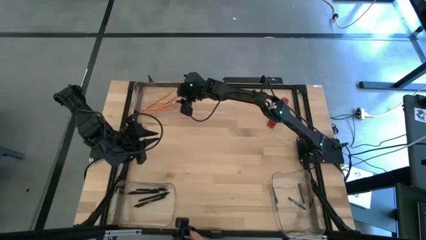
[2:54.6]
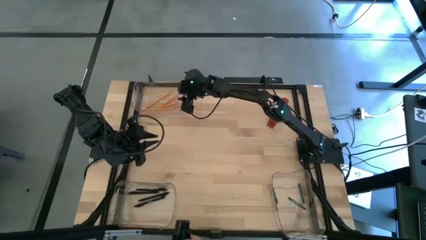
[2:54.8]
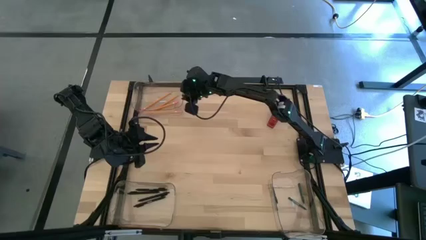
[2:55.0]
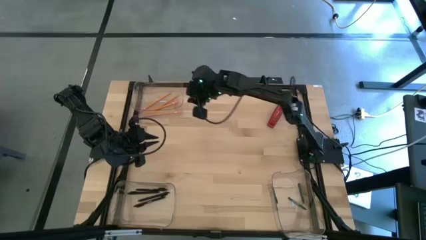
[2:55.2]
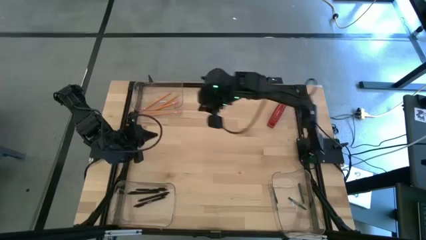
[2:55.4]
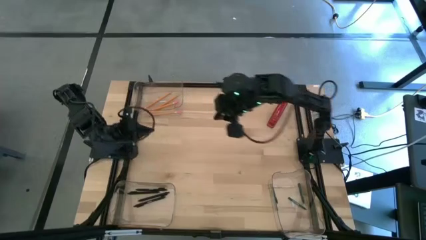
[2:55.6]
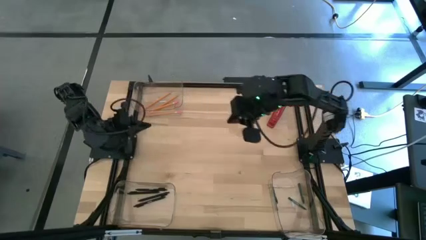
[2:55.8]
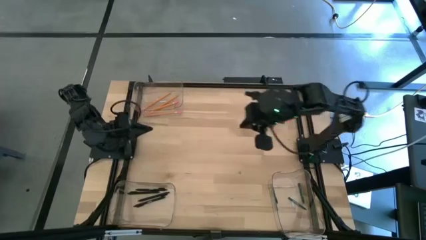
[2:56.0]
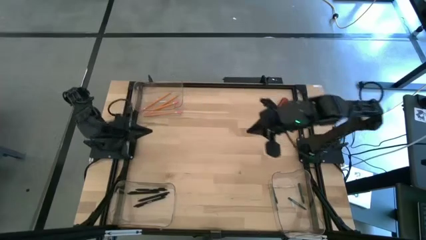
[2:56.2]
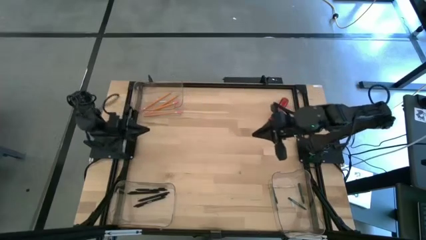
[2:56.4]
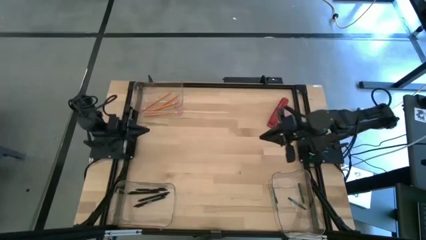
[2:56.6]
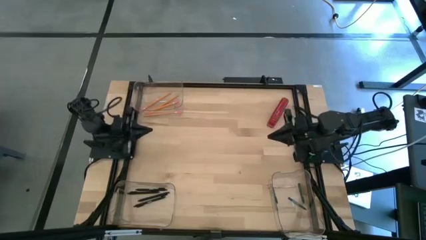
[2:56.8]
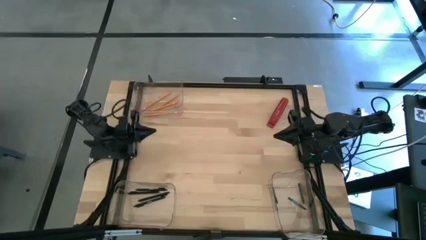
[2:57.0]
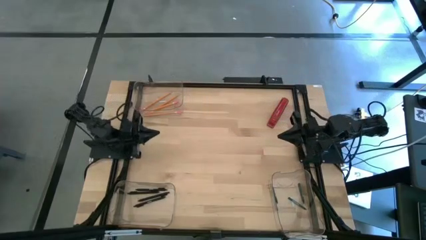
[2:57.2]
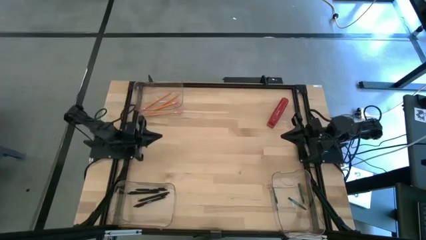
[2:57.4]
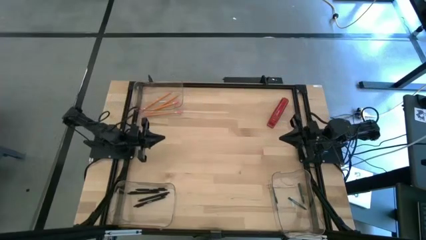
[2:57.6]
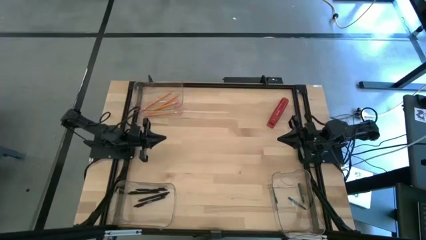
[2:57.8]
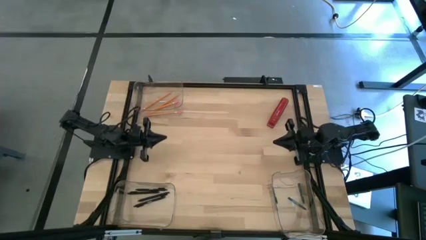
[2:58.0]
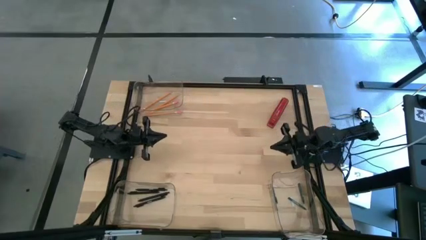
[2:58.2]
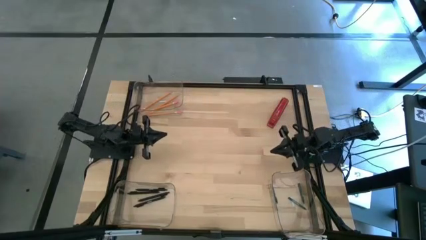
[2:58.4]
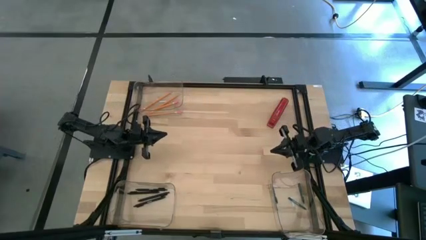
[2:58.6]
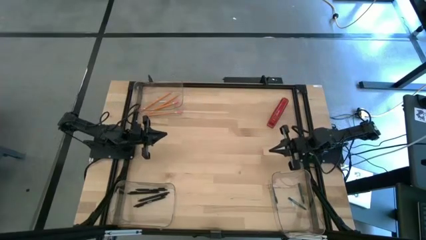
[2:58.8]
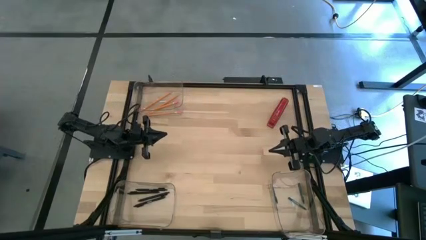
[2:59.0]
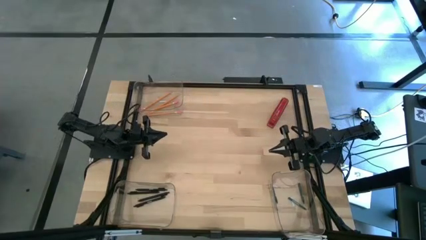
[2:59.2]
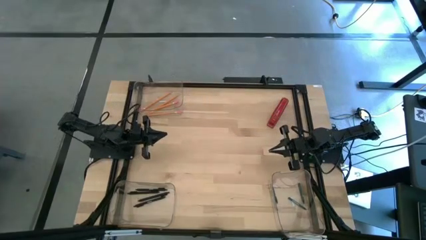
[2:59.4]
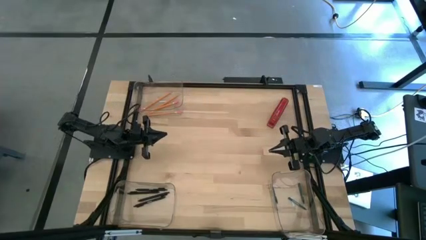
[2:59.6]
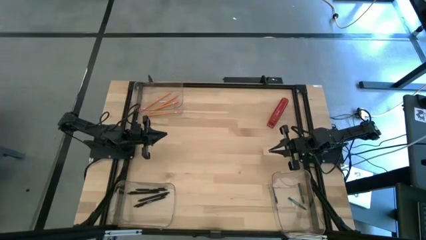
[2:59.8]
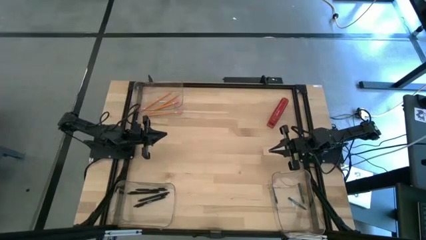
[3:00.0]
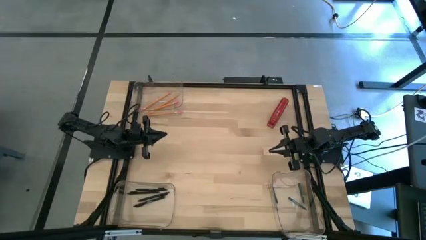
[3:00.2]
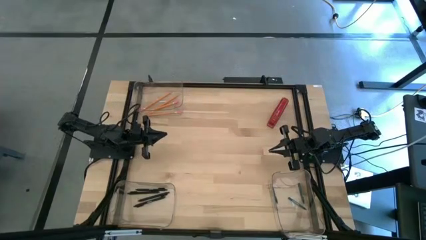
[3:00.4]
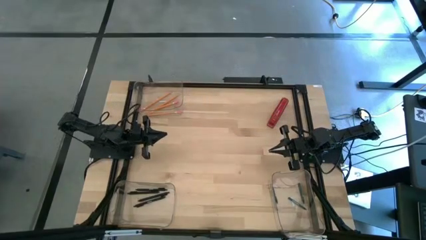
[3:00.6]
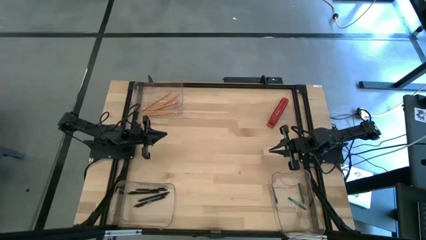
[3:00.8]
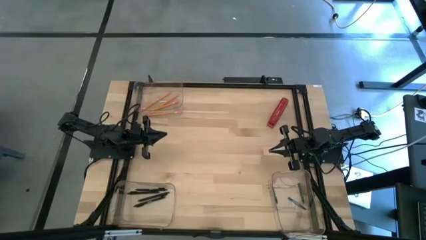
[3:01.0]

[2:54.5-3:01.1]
Task: Sort crayons/erasers/pens/pencils in bins
Return to Home Position

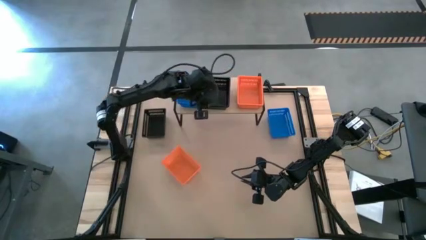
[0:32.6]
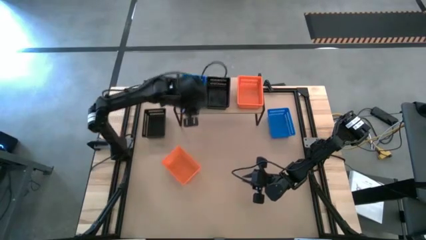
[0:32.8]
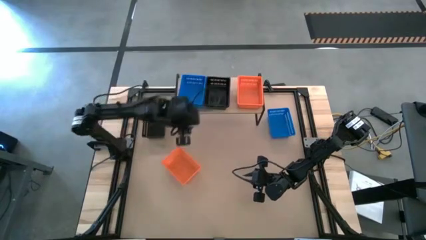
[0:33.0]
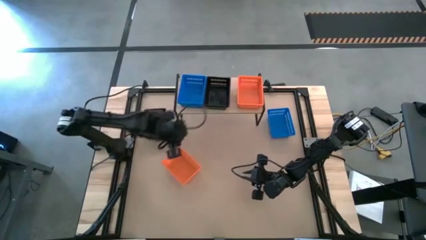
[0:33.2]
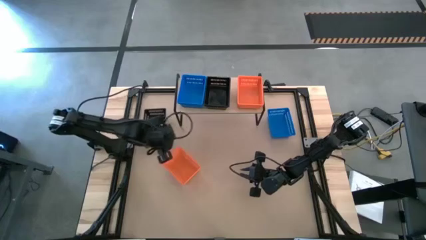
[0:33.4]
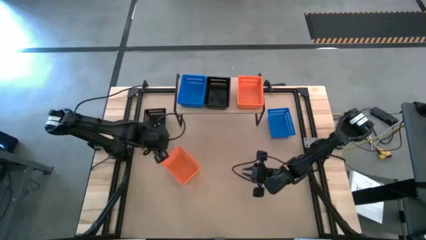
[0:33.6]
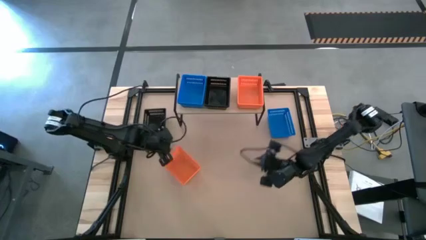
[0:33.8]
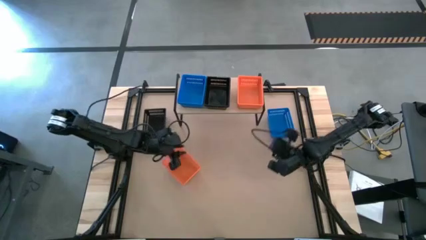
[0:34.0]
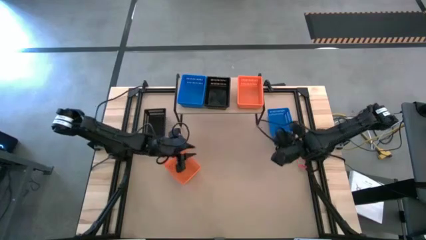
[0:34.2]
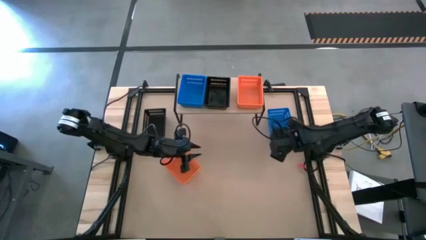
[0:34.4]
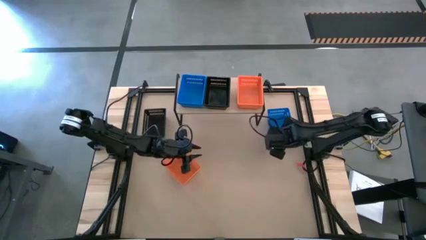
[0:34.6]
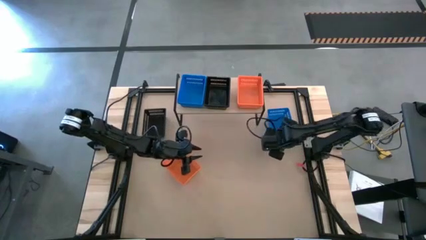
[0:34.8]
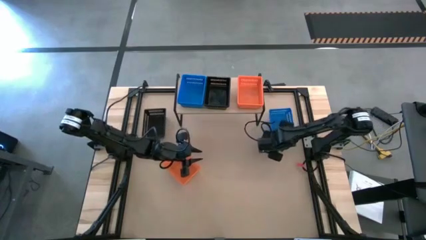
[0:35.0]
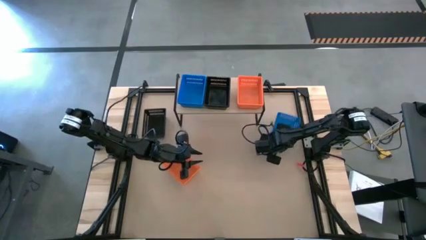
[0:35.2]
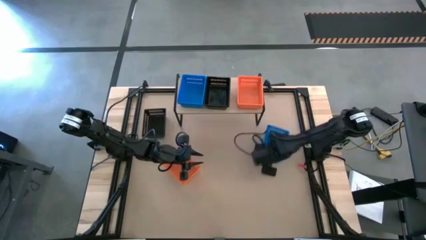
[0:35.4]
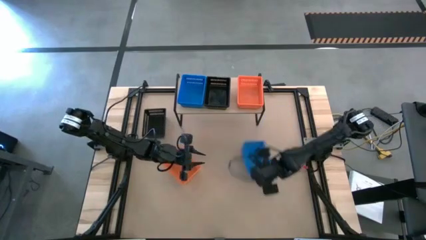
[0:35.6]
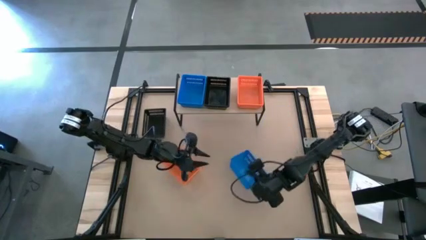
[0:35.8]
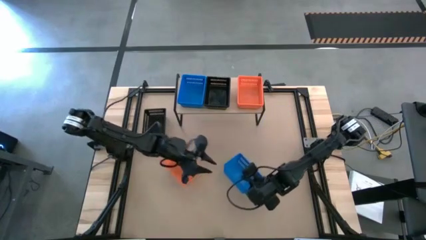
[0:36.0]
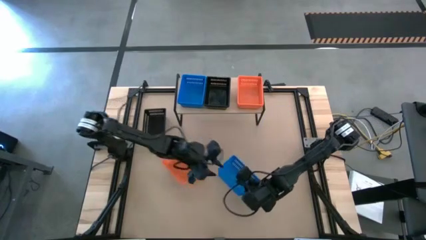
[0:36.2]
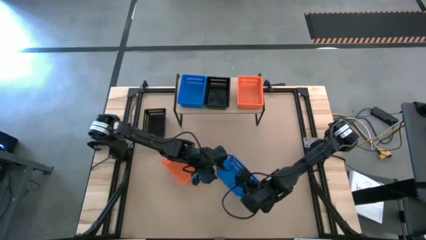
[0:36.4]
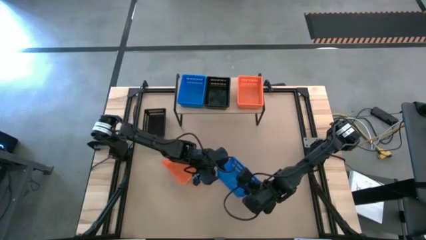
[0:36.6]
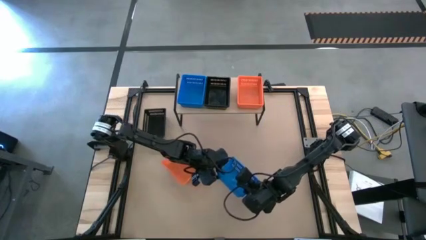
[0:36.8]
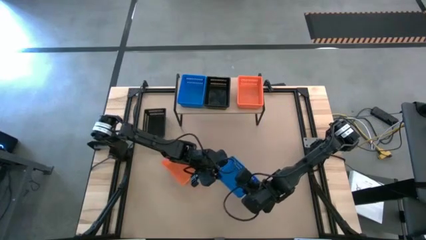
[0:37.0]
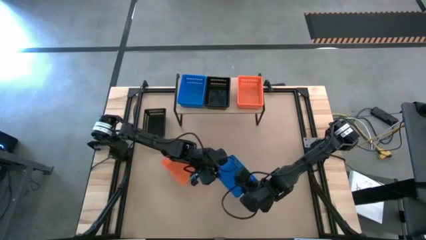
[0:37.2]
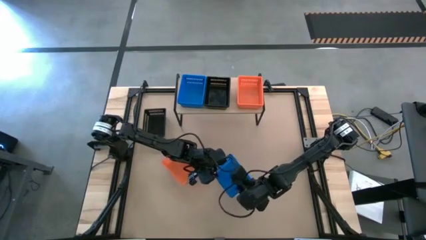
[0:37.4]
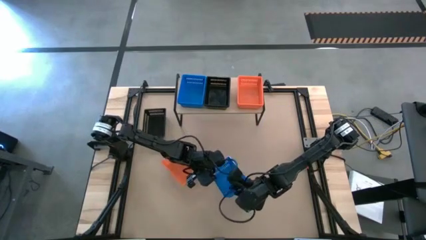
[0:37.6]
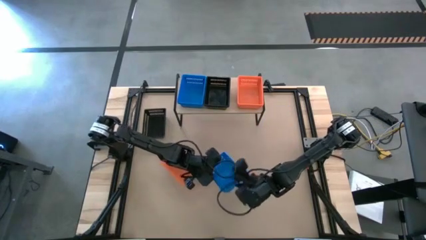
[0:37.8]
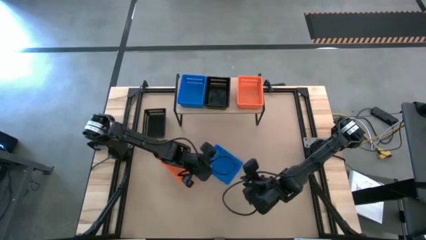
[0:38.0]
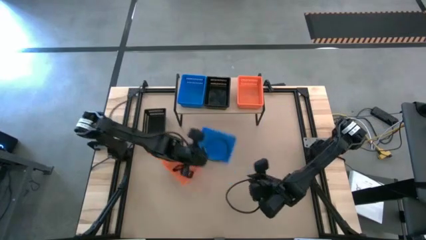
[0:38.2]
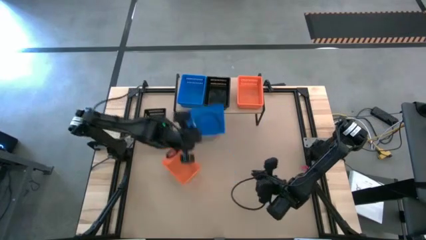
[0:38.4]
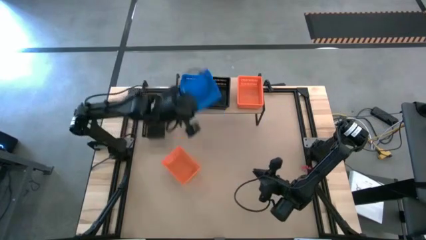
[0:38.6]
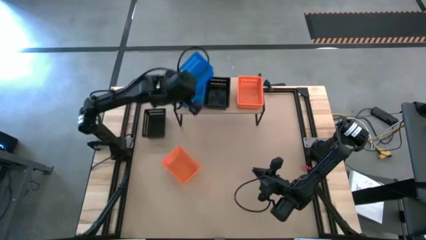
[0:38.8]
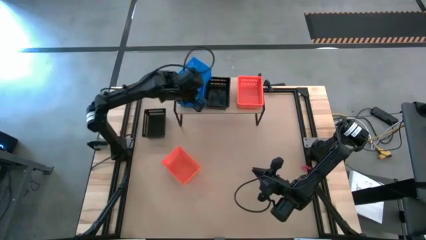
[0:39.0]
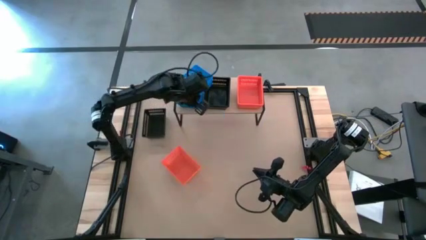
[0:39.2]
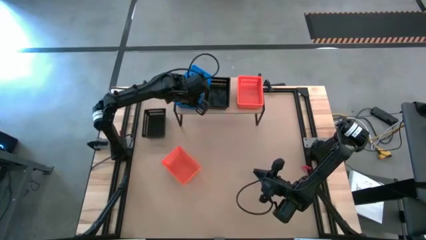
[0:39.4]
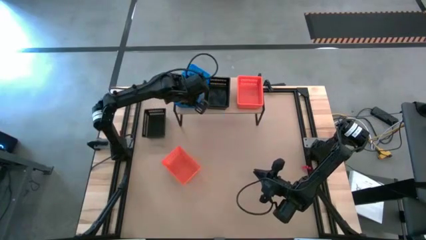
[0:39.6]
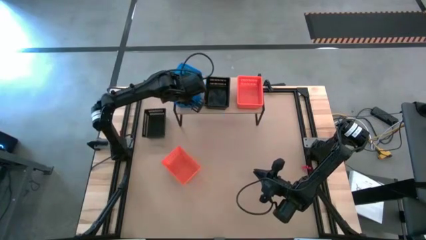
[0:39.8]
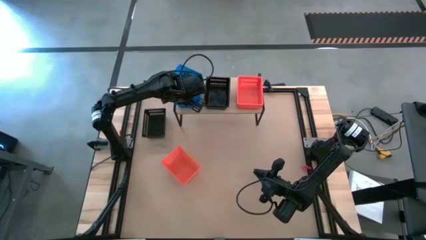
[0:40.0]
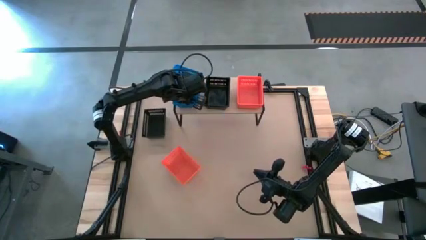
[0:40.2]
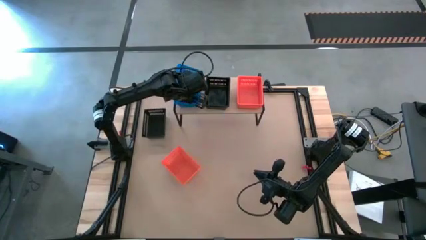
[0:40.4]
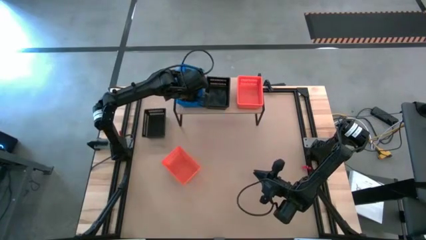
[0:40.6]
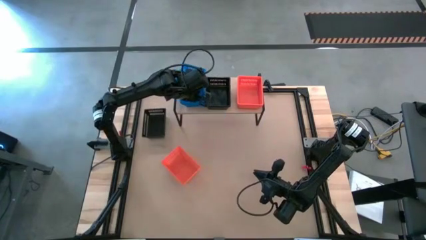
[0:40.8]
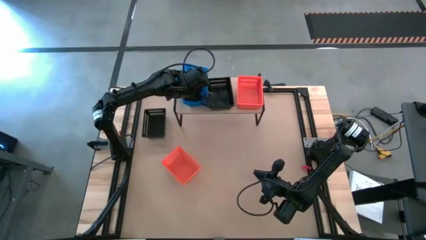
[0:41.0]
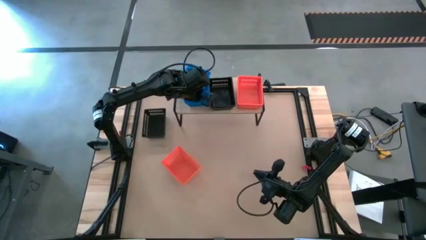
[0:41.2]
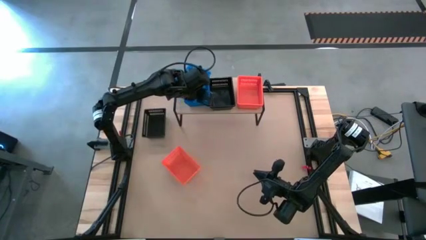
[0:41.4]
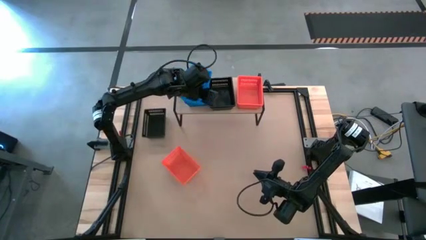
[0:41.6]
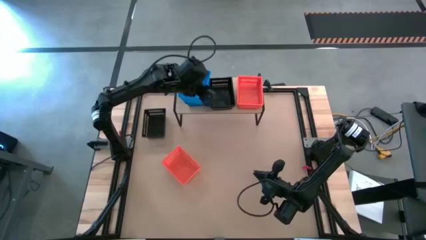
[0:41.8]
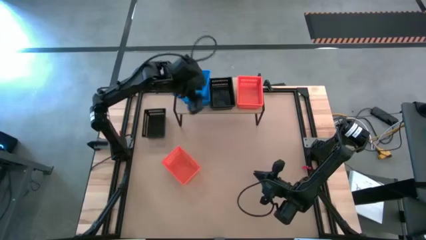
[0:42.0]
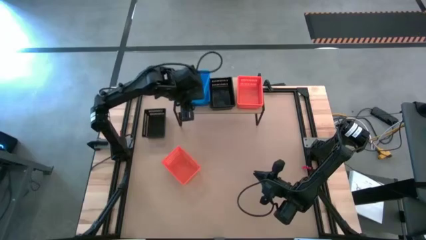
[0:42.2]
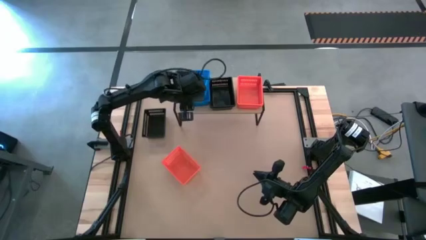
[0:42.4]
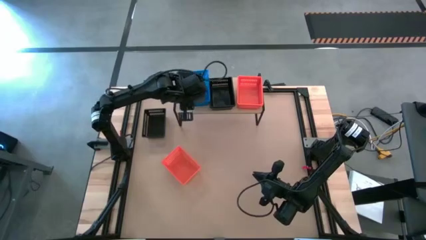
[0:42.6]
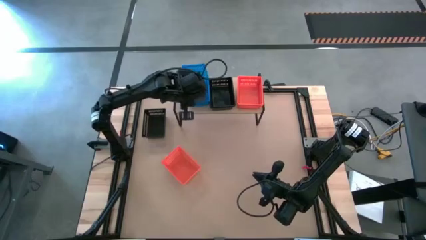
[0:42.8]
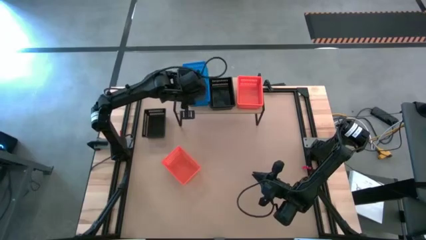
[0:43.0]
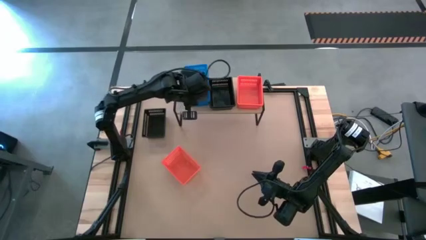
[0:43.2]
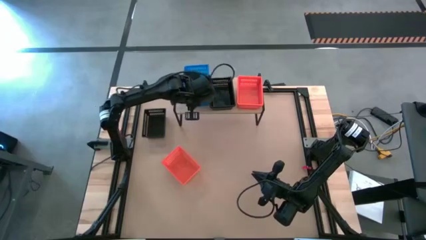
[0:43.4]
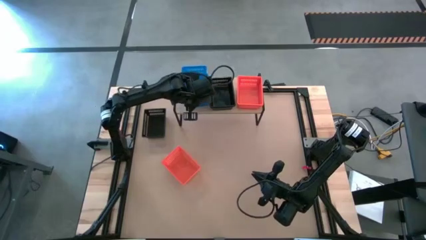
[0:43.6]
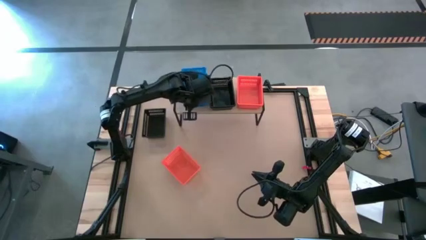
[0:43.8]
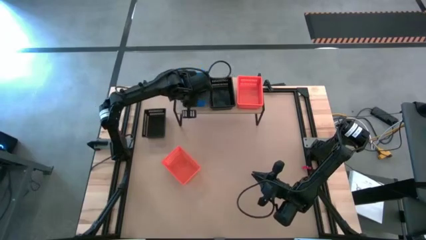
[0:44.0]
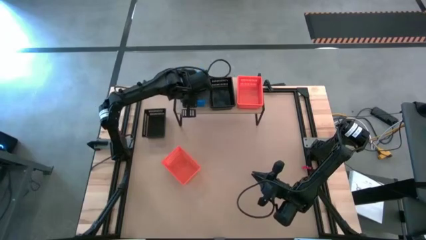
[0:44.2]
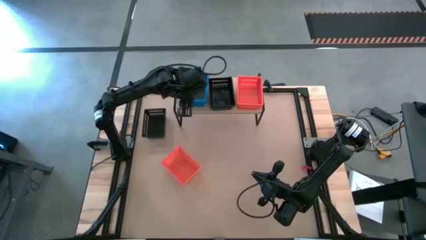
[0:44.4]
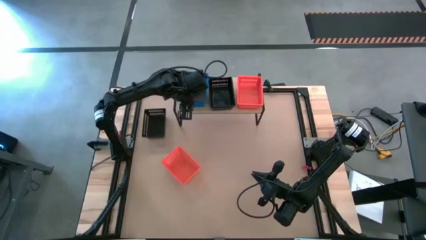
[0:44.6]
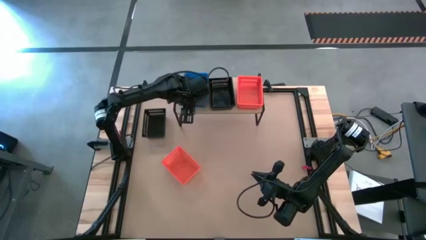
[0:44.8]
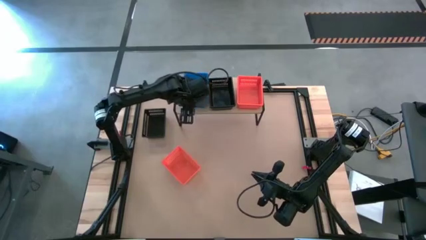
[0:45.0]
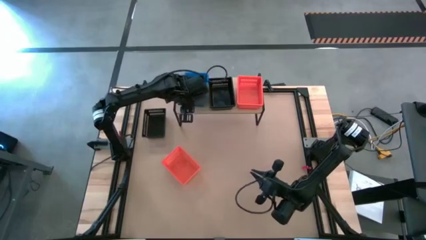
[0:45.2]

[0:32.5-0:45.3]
Task: Stack baskets on shelf by color
Stack the blue bin on top of the blue bin on the shelf
